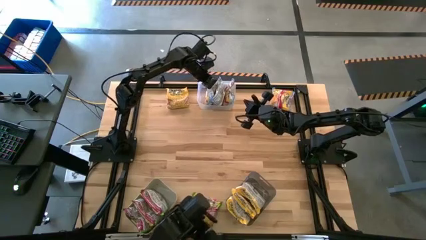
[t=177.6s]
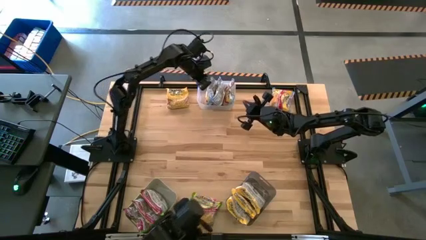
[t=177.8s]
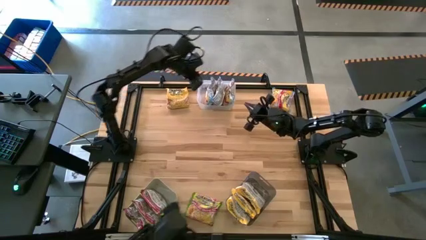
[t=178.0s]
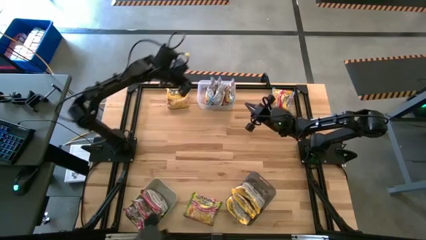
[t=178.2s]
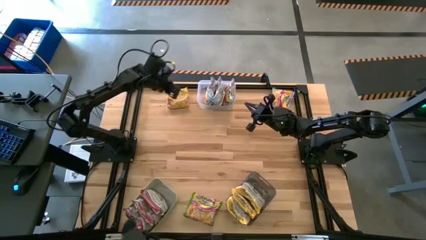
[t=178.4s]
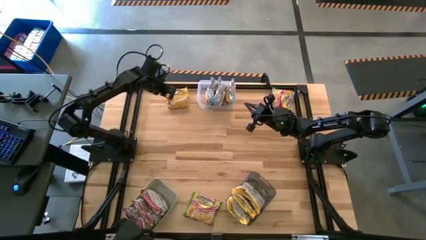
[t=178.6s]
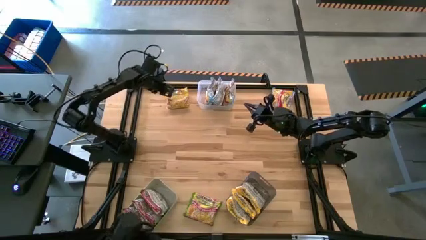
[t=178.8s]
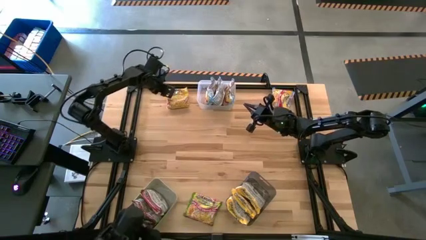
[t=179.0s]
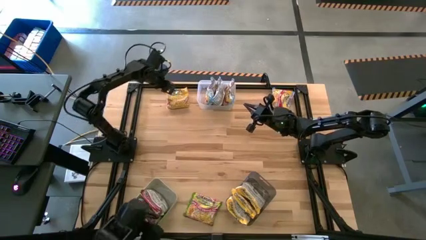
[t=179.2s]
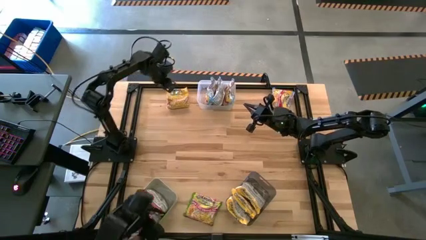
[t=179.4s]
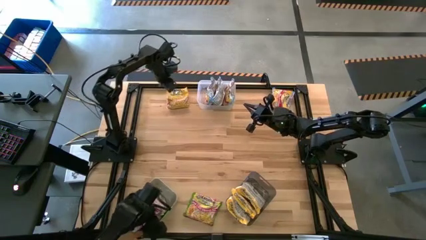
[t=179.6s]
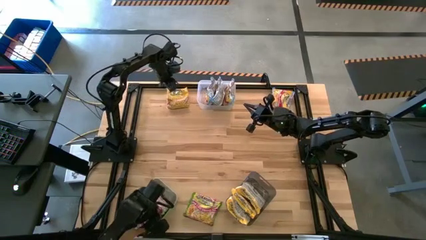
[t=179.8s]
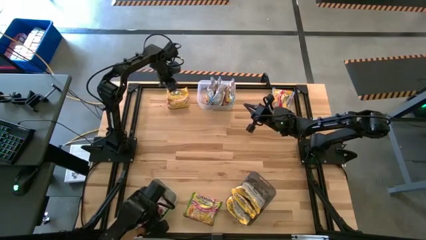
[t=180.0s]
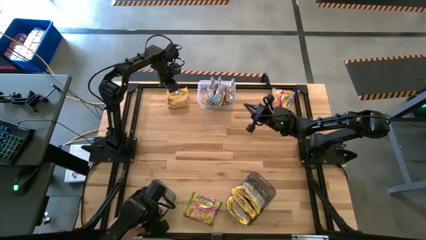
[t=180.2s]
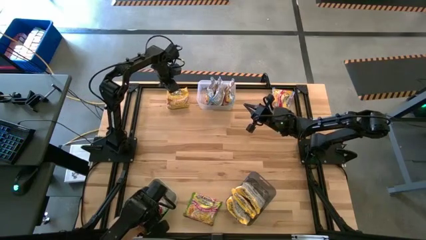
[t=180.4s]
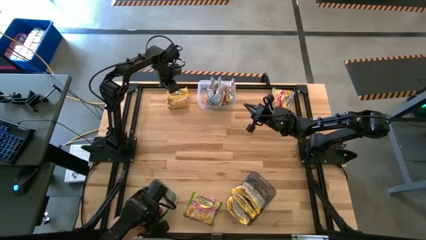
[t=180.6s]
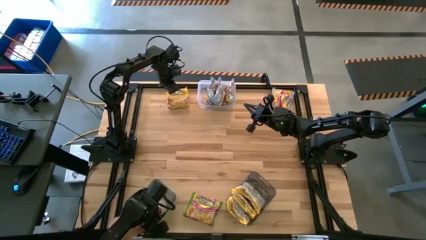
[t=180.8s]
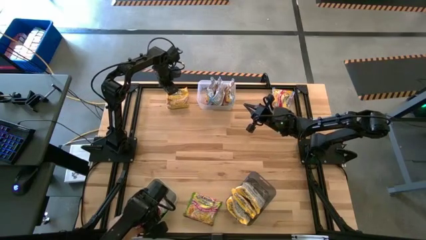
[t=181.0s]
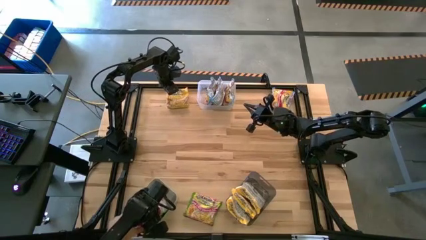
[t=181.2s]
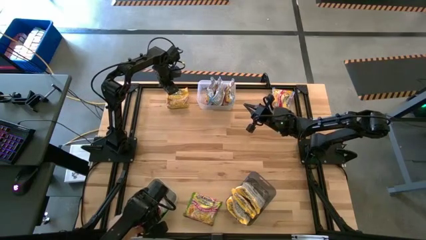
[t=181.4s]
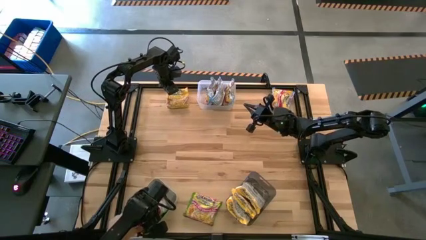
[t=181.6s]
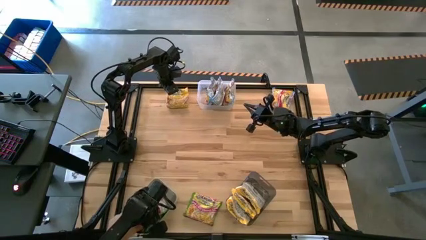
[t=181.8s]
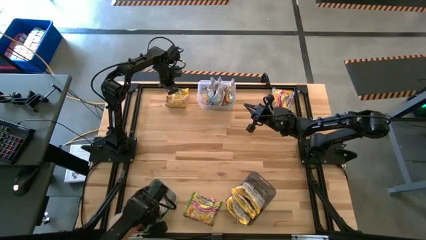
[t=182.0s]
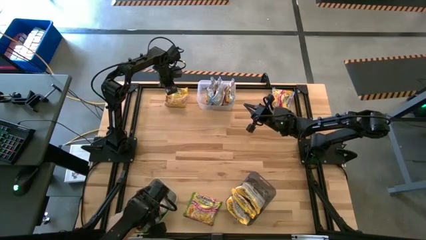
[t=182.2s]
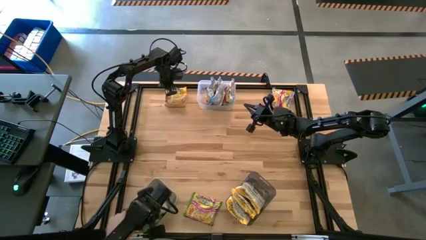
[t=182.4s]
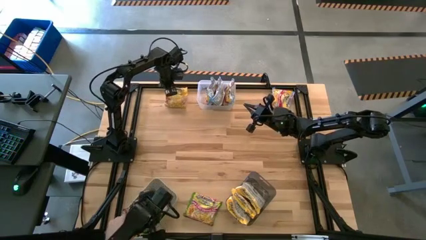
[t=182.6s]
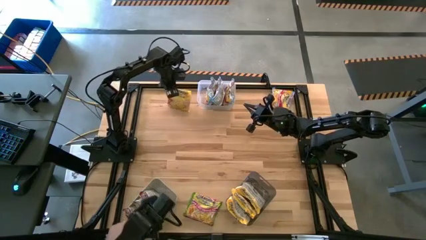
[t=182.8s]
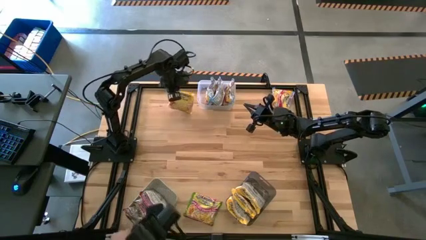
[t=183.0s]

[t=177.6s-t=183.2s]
Task: Sort Maruchan noodles
Put the yellow noodle pack into the black bin

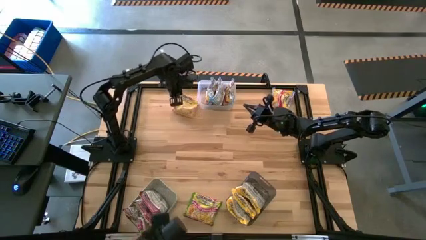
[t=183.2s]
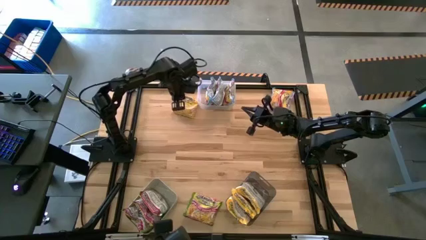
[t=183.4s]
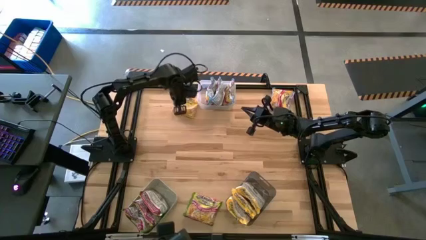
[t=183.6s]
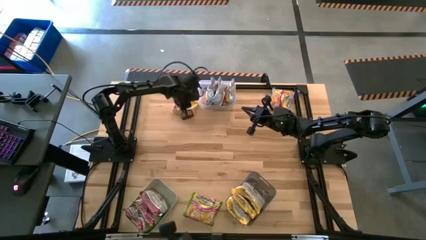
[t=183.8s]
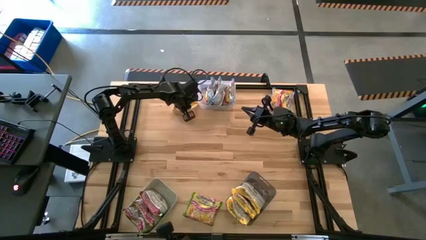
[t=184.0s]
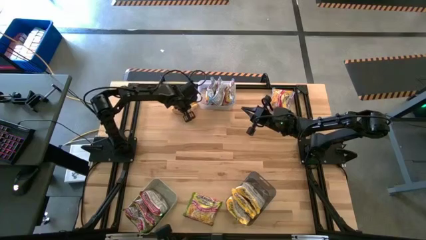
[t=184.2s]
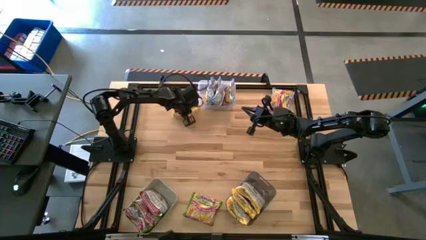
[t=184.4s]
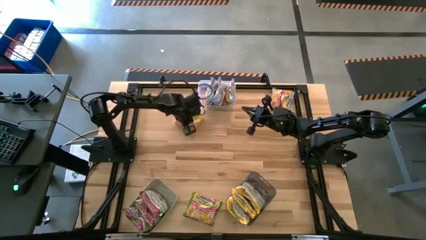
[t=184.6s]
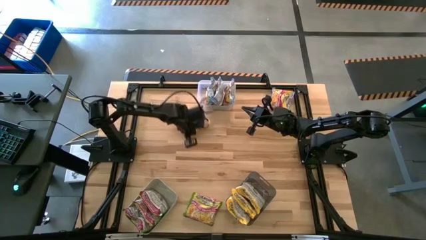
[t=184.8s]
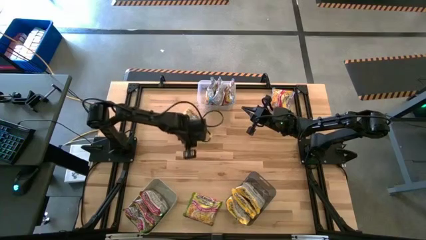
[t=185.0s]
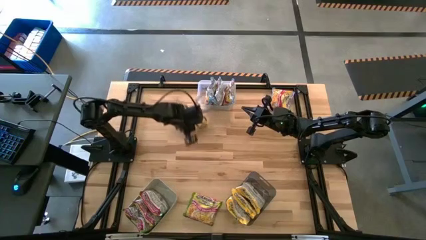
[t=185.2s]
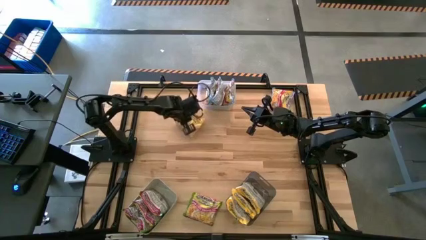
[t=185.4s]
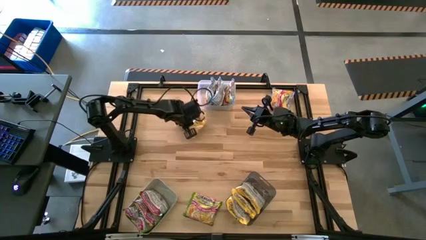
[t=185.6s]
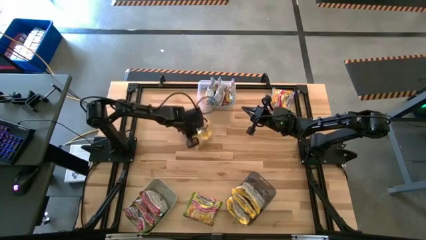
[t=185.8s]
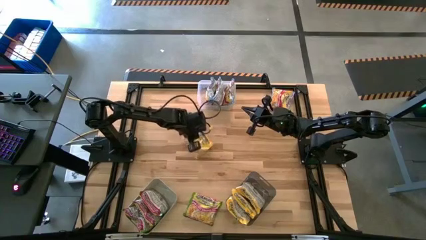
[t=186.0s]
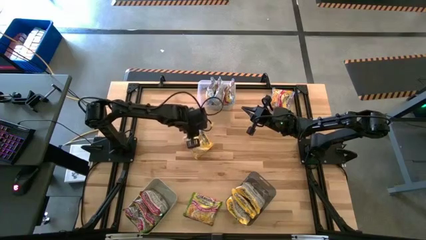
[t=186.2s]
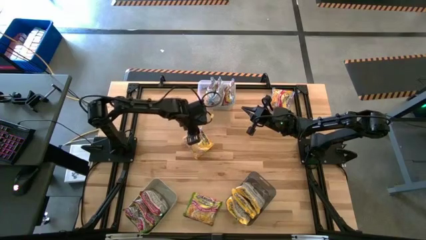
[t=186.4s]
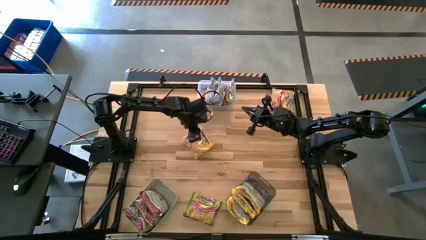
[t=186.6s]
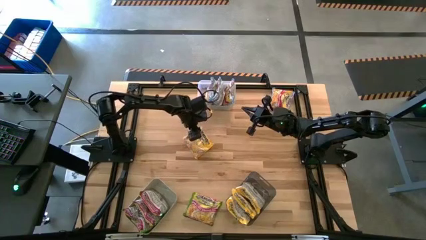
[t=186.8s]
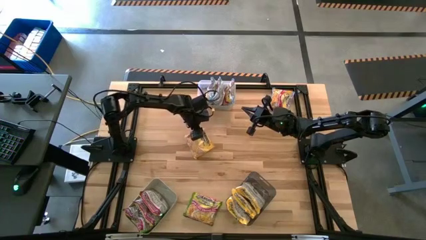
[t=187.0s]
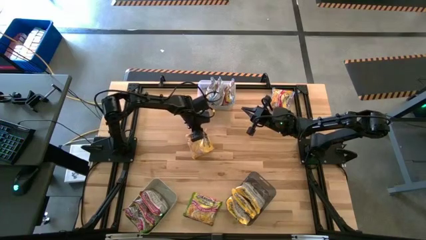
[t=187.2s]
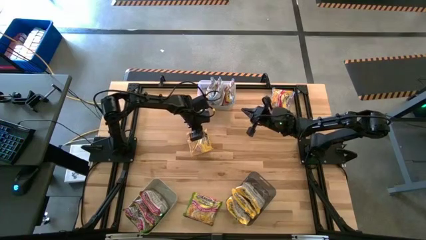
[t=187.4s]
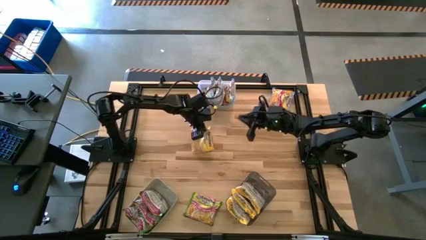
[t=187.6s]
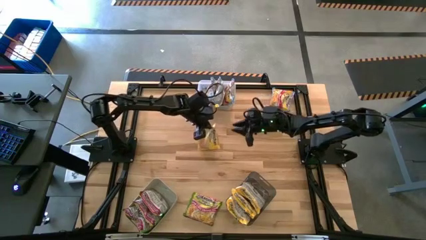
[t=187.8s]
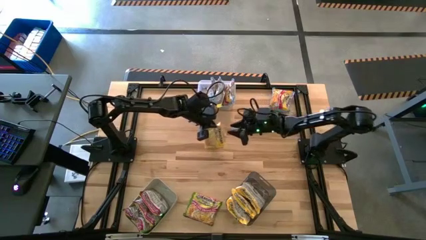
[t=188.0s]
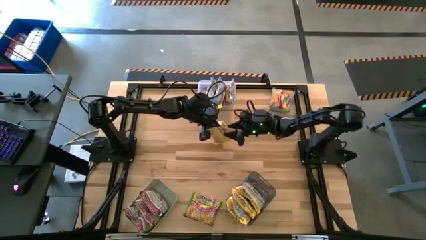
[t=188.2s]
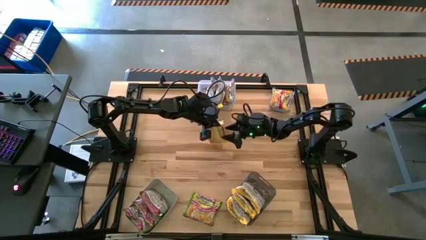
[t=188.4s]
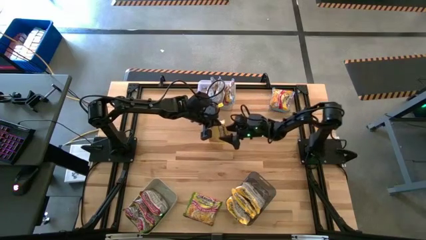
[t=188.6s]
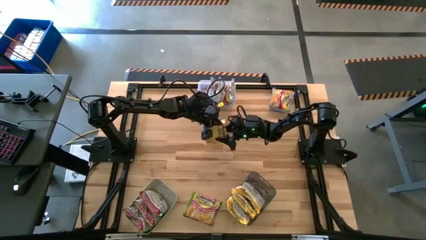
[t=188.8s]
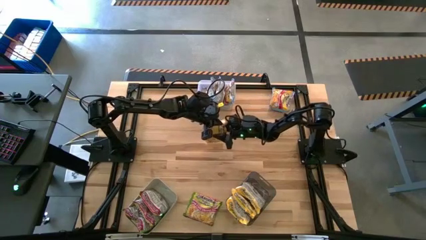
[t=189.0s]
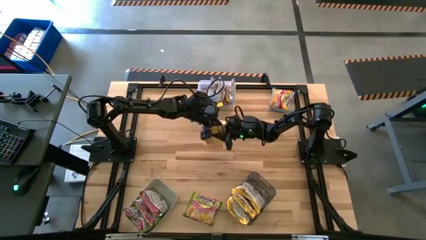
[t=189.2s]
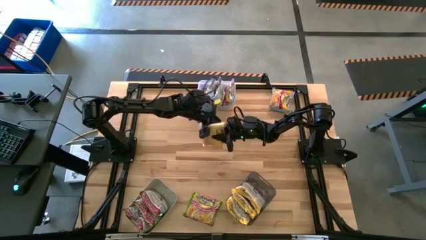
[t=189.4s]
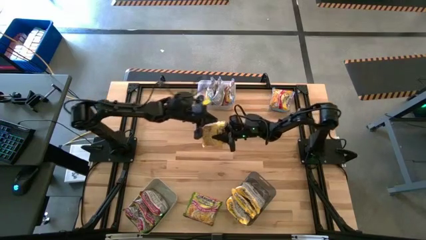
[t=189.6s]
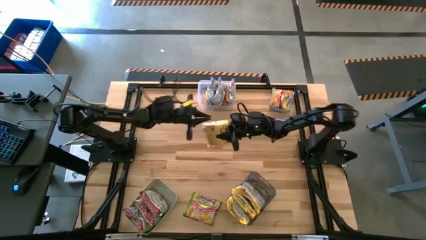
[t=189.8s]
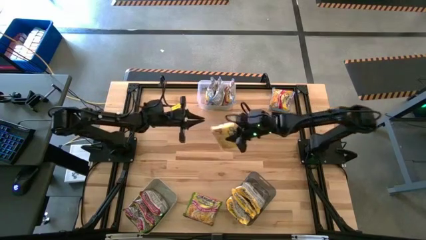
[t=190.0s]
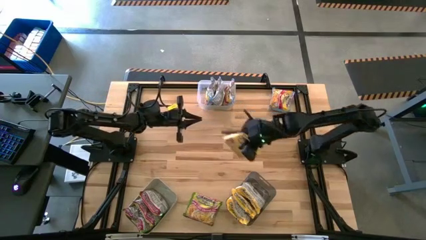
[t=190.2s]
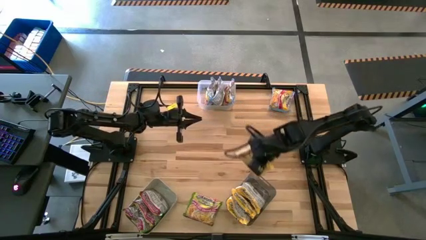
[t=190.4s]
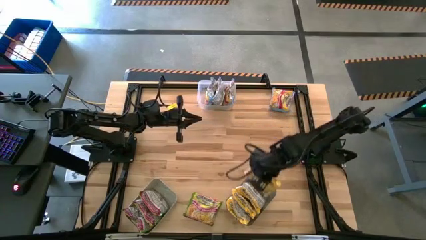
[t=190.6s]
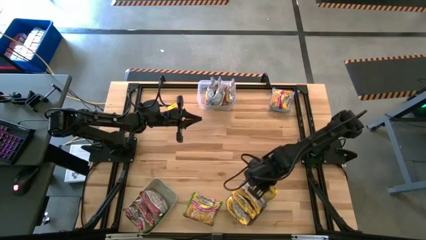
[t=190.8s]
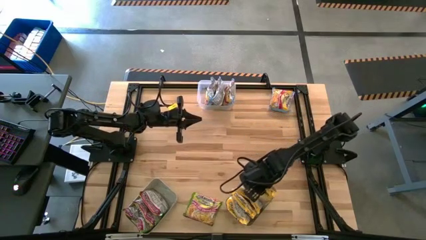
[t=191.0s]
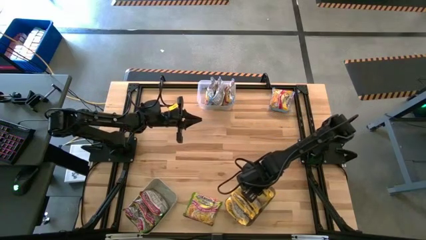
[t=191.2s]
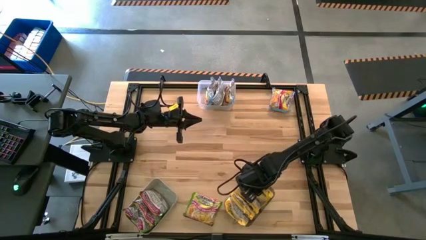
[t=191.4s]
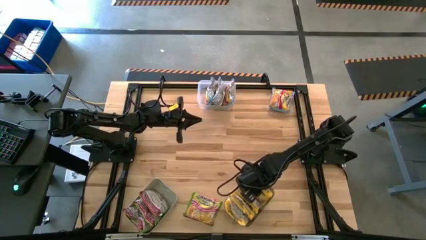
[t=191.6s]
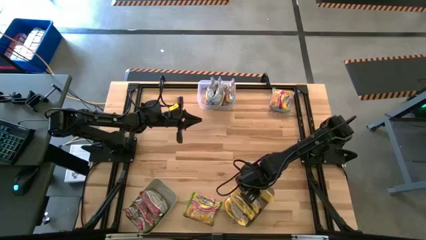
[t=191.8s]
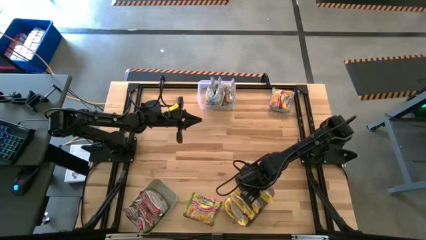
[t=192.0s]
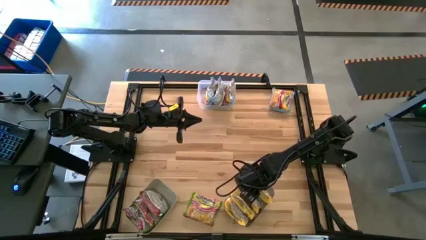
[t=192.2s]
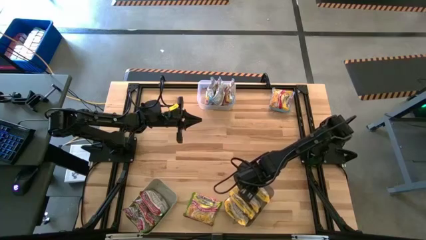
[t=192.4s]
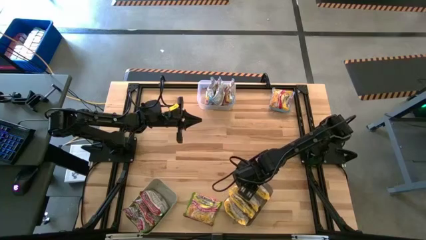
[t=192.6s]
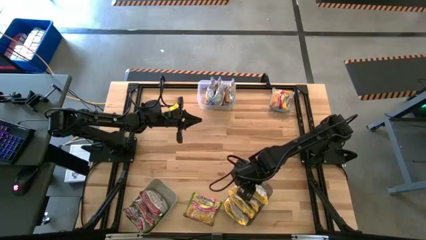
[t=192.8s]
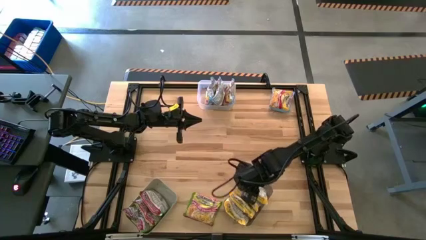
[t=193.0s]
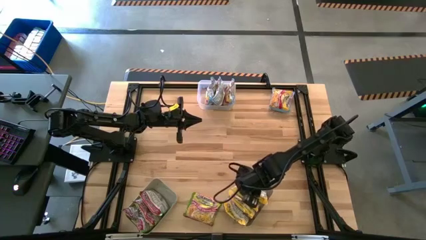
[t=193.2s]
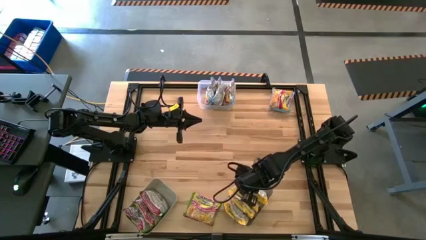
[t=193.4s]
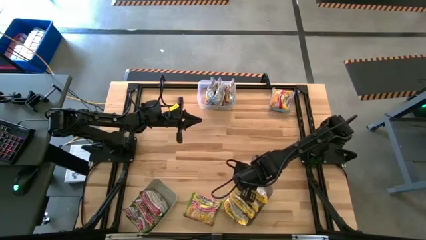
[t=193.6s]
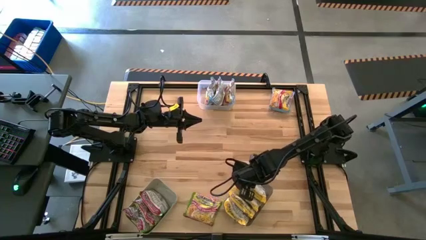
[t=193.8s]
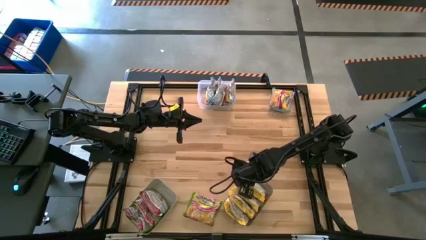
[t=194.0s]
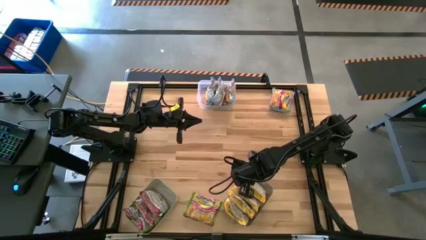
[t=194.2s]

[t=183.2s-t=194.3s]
Put the yellow noodle pack into the black bin
